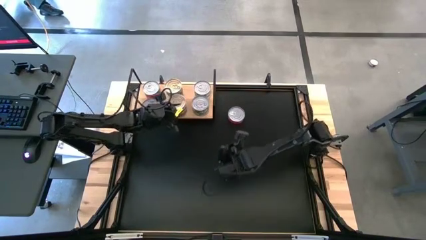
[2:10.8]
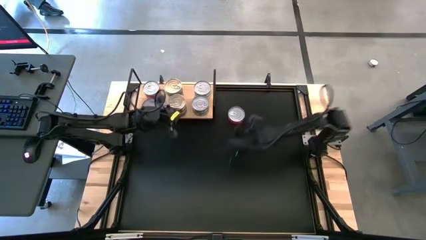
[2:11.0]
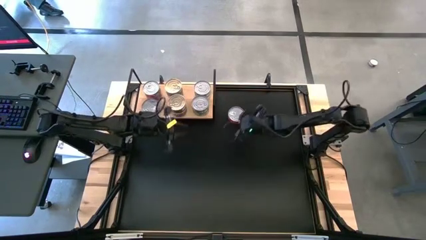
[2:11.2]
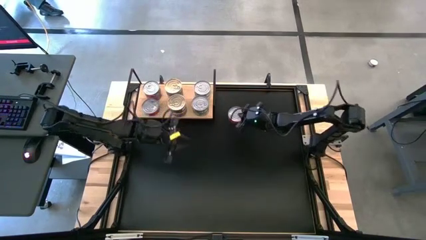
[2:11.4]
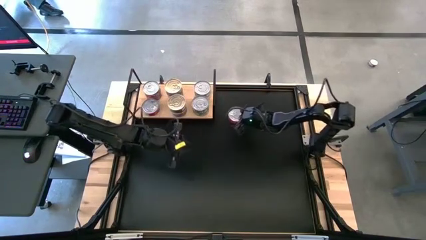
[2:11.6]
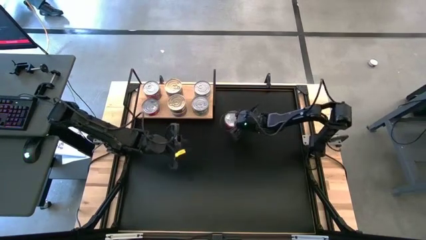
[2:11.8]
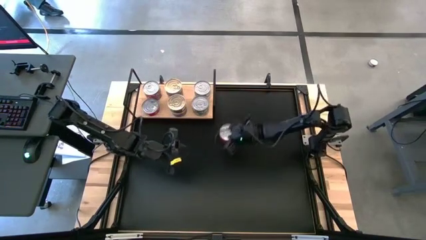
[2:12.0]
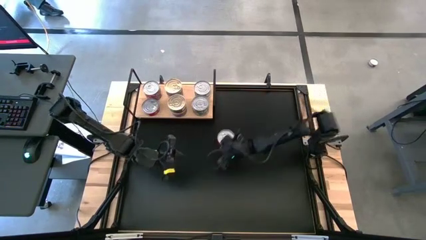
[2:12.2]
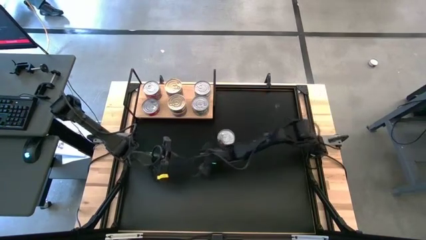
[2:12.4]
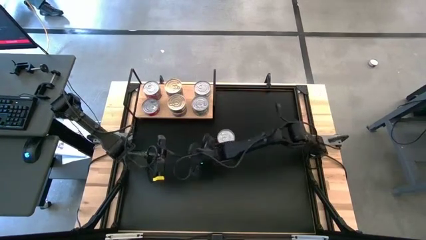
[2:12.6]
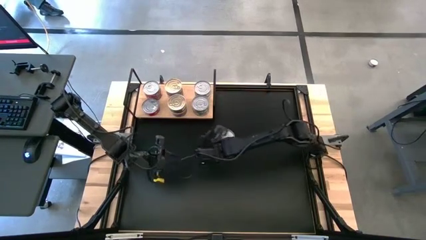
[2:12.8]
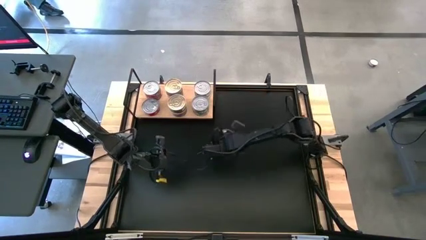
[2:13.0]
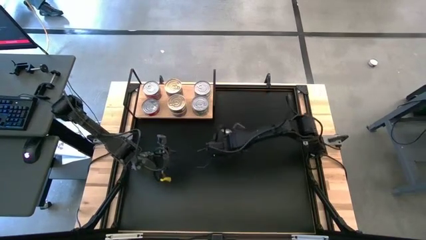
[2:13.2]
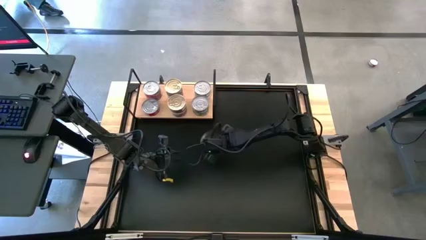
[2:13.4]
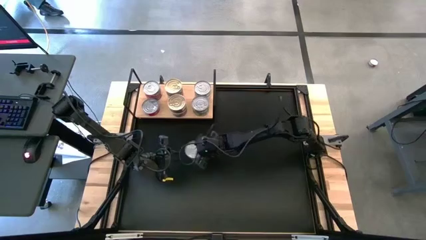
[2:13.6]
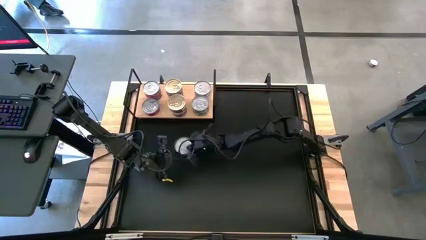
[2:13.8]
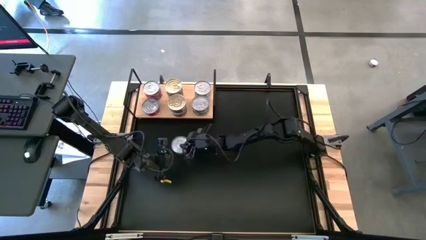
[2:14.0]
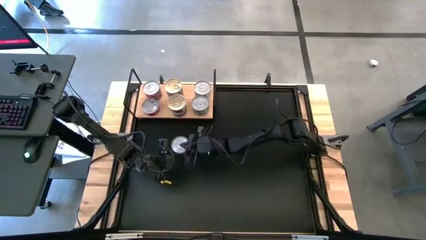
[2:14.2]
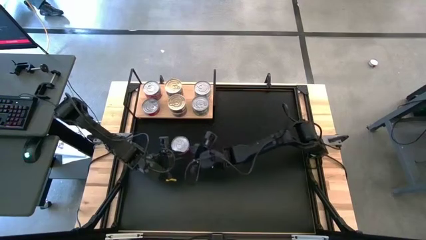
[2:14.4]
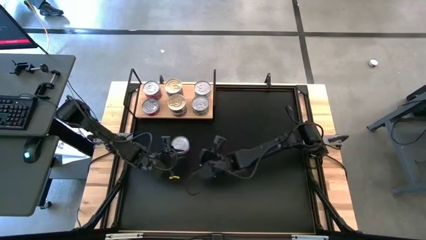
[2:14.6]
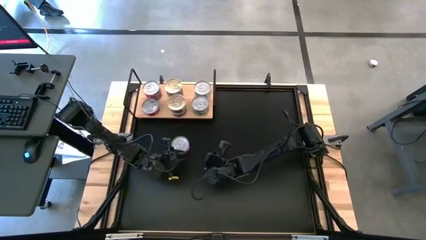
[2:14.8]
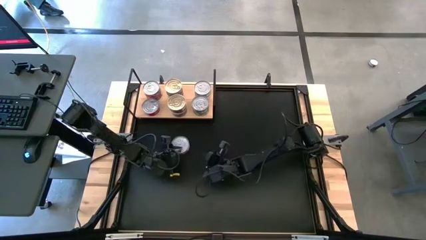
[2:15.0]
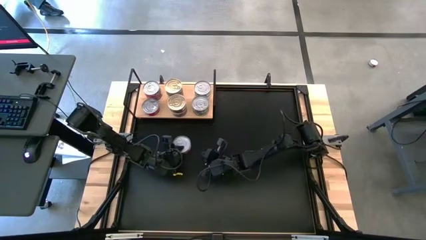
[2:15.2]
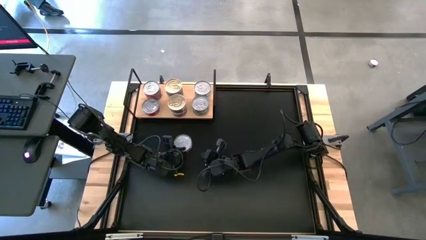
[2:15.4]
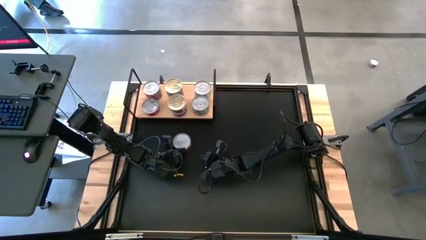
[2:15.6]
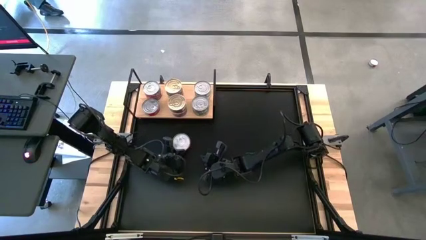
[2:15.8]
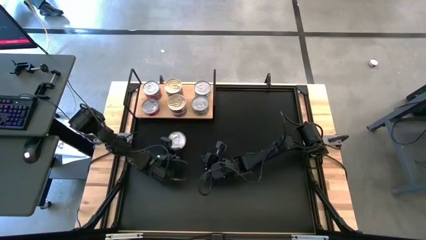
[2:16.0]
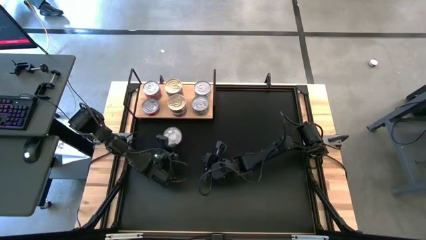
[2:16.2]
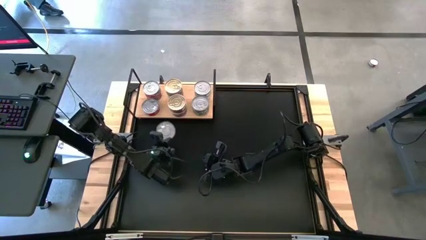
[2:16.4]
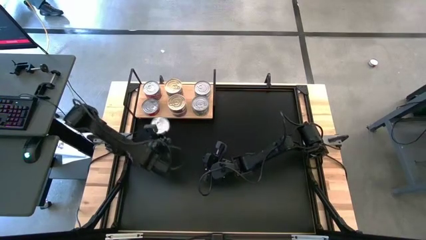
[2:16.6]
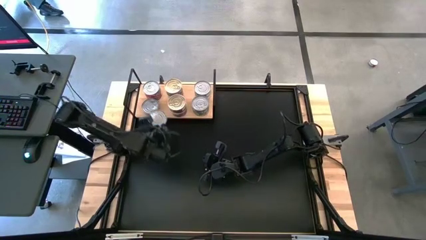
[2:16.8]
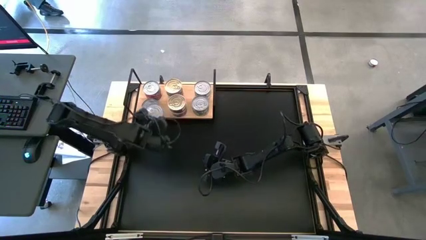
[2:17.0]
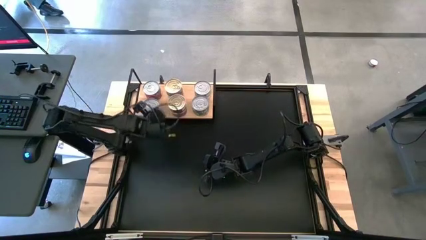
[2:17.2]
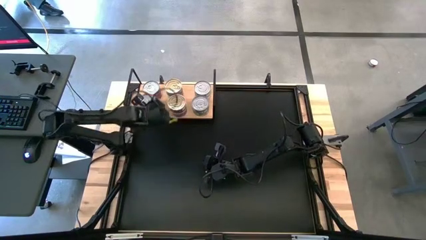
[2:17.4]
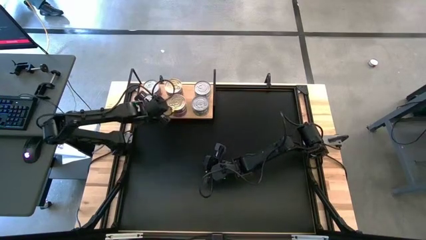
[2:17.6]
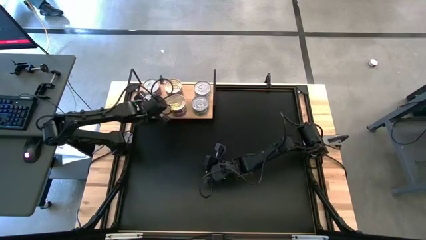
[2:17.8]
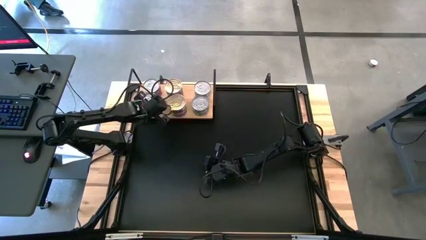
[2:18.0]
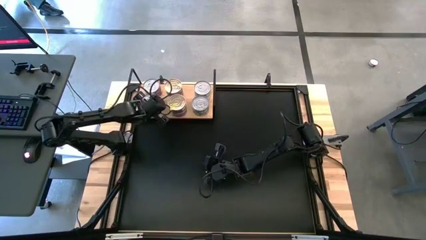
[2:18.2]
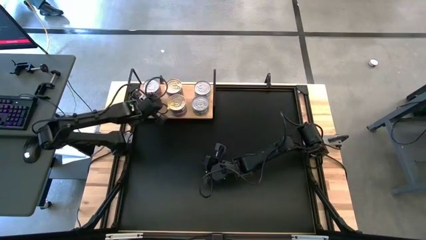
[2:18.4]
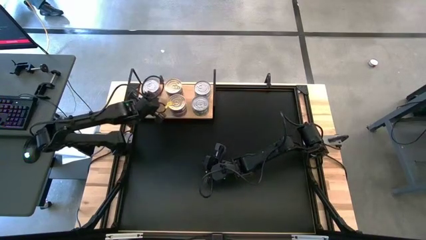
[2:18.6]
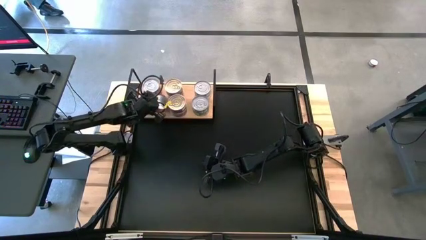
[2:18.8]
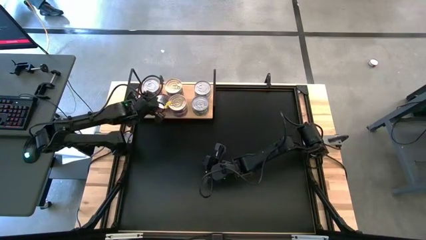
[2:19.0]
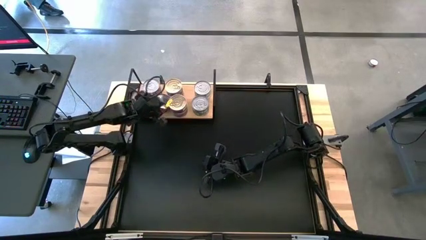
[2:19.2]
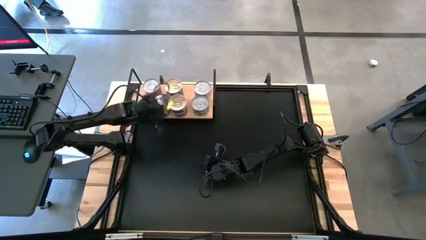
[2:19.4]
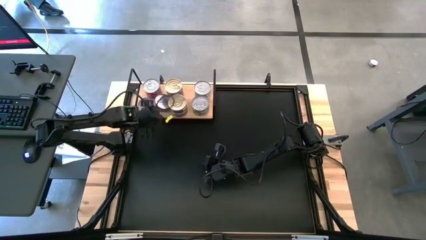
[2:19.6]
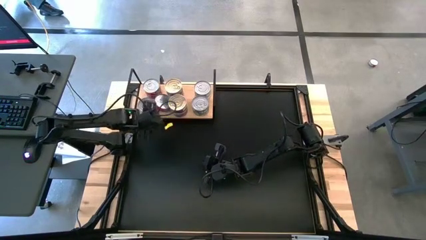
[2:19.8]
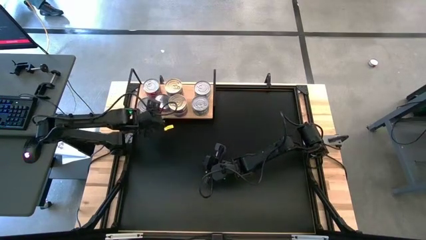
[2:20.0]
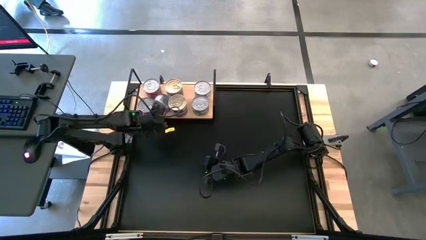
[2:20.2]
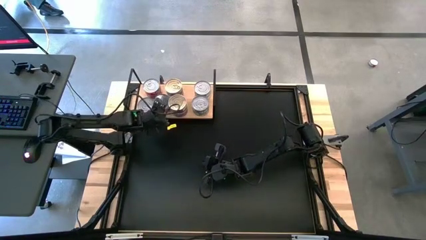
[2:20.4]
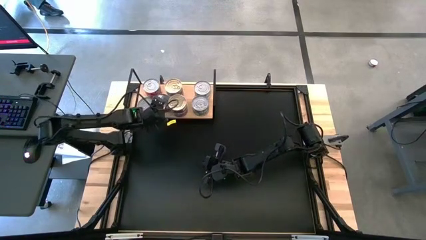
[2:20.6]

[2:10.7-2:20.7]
Task: Stack canned seafood by type on shelf
Stack the red tuna can on the top of the other red tuna can

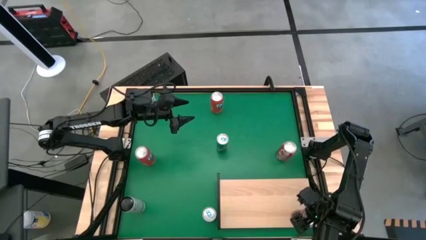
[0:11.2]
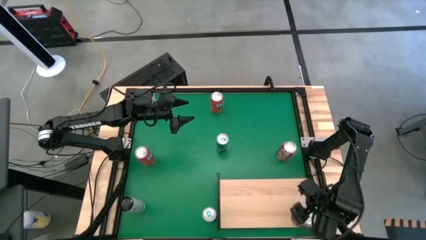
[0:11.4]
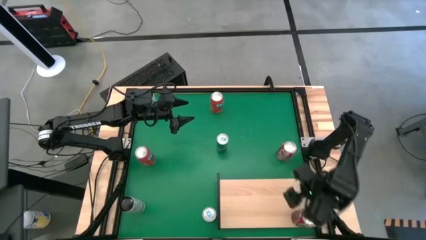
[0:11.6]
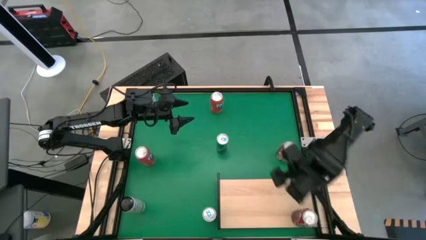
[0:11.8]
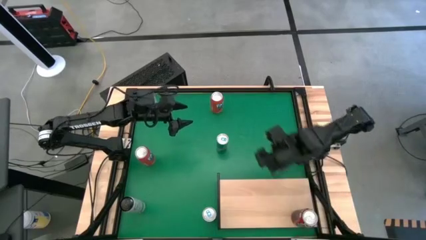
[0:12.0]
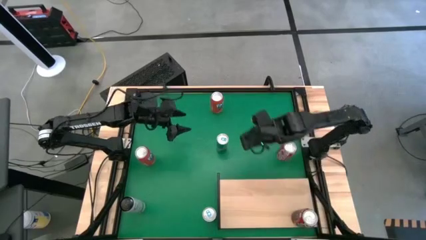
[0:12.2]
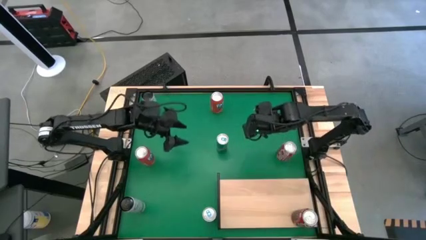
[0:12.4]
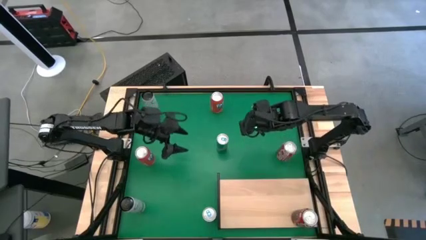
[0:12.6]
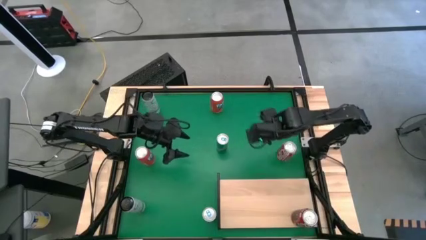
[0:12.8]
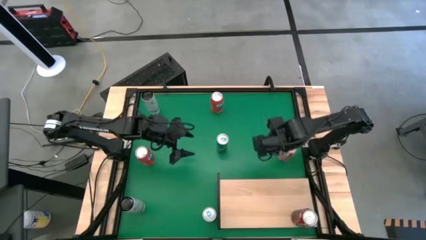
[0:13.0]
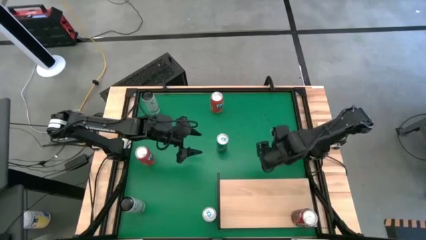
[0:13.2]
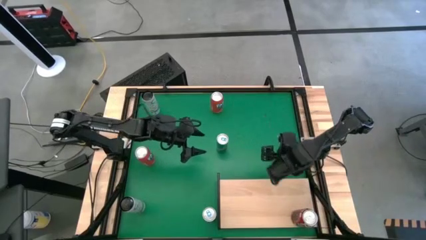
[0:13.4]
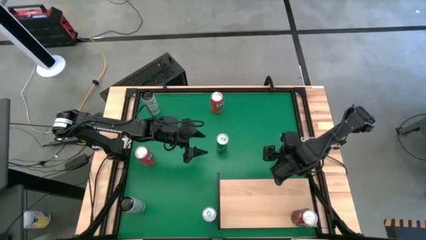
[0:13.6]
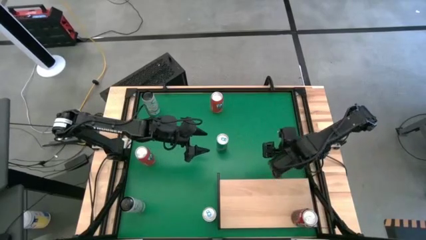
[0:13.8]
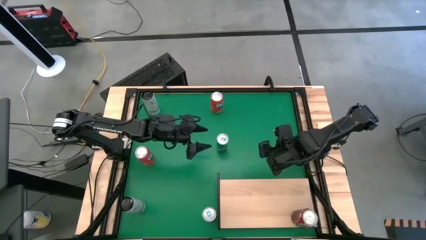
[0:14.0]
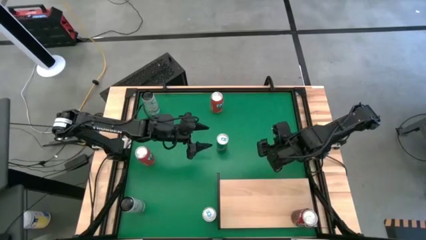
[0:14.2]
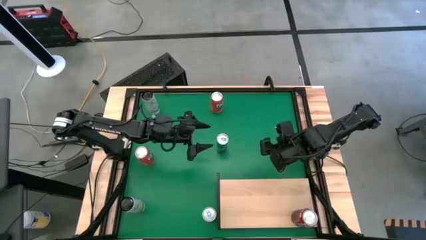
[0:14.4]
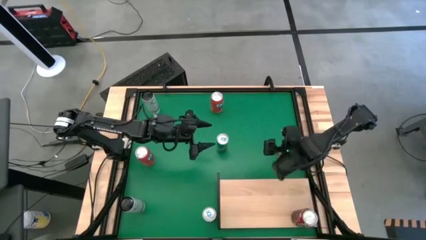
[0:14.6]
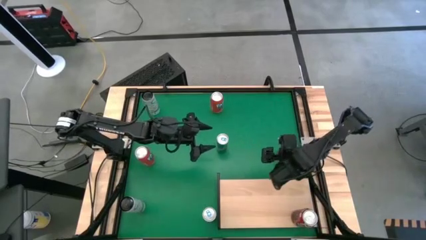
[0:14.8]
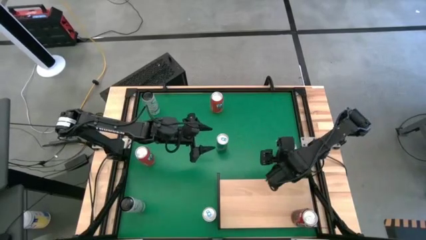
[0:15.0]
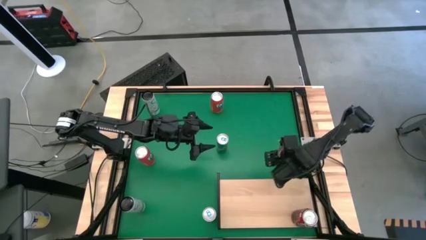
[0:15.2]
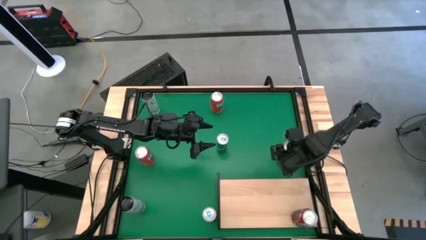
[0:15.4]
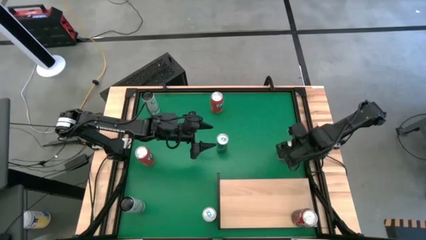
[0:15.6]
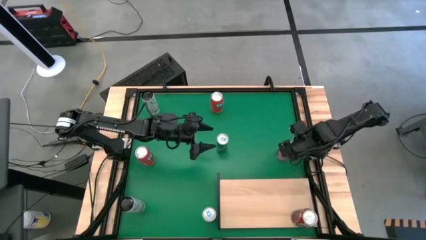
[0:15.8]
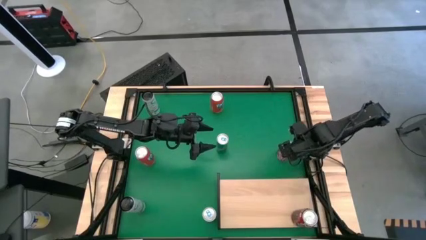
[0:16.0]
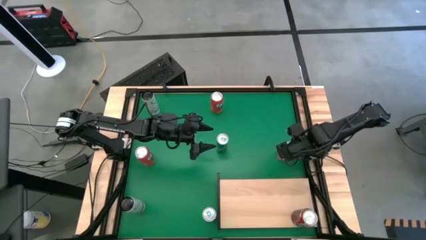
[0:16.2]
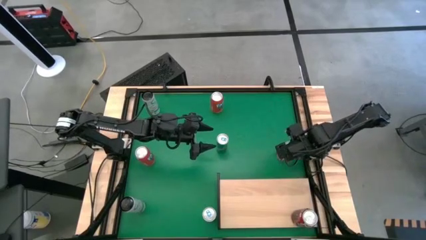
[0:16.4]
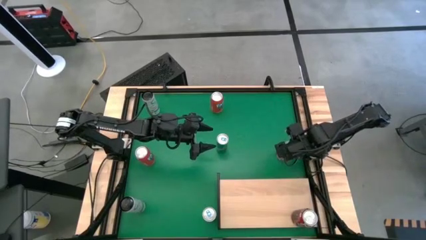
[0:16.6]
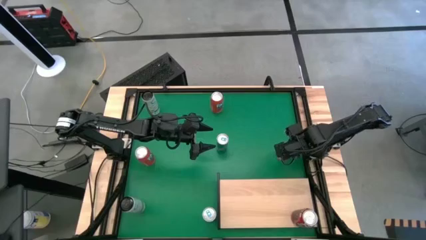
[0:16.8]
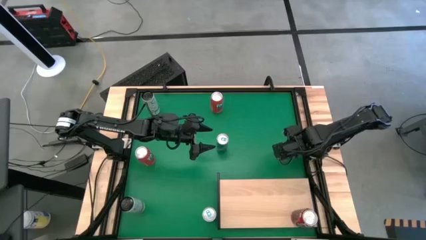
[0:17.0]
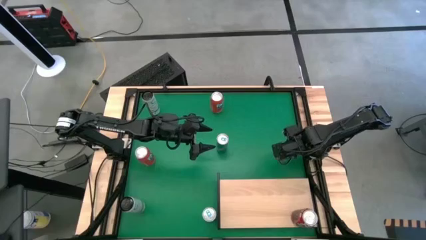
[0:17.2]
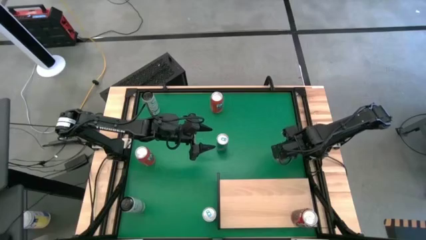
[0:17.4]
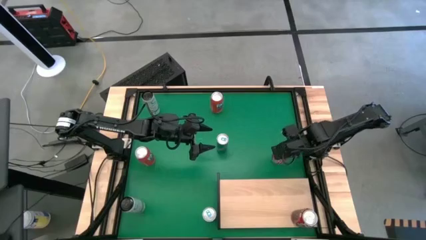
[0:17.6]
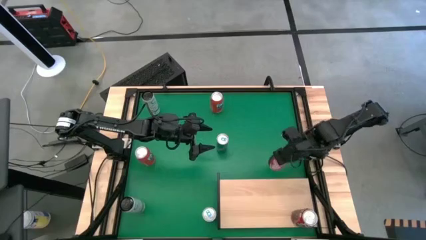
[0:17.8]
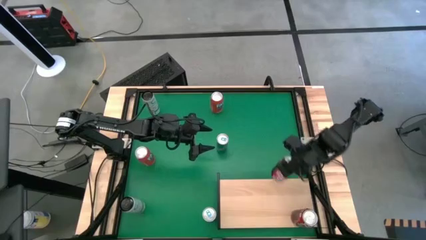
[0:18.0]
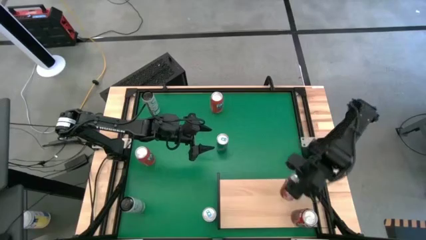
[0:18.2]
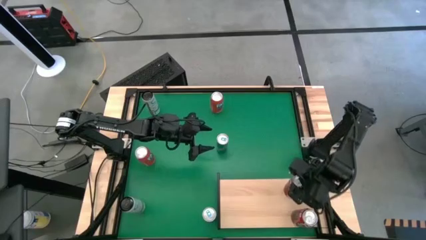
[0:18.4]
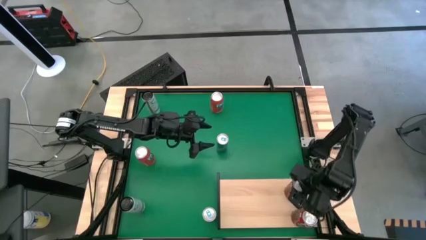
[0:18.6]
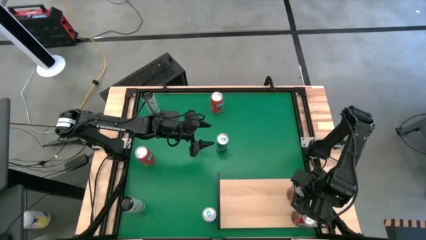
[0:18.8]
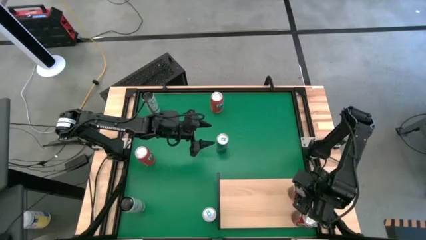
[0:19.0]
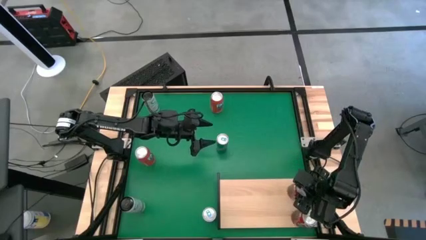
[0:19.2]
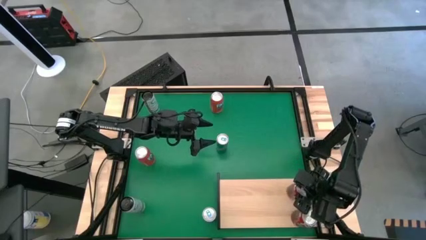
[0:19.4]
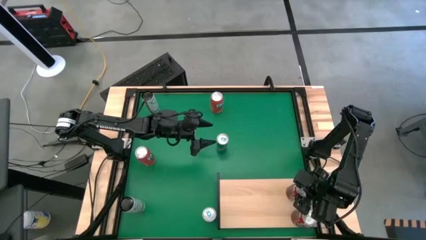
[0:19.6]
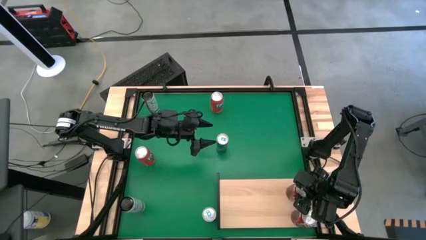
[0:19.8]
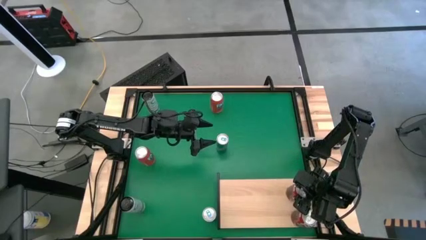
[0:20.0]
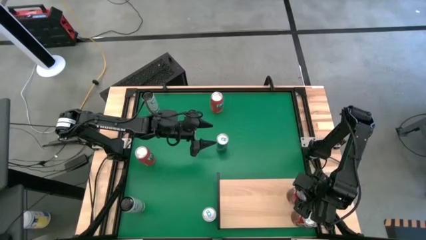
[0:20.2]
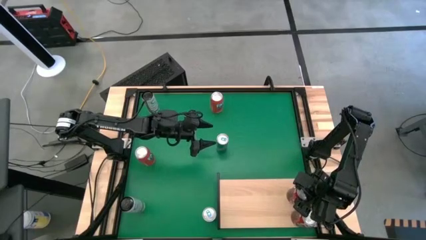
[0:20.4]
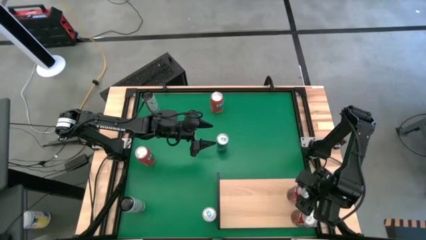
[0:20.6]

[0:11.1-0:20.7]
Task: Place canned beverage on shelf
Put the red white soda can on the shelf aligned with the other red white soda
